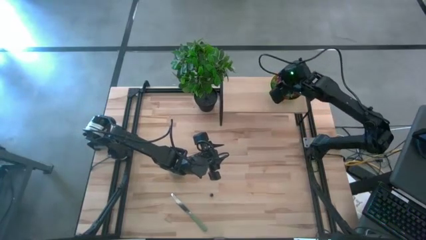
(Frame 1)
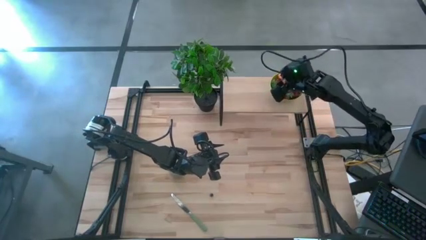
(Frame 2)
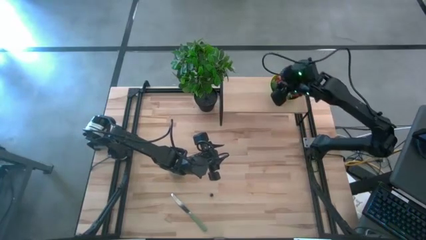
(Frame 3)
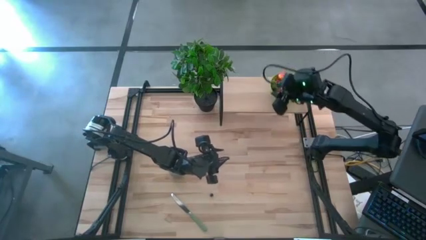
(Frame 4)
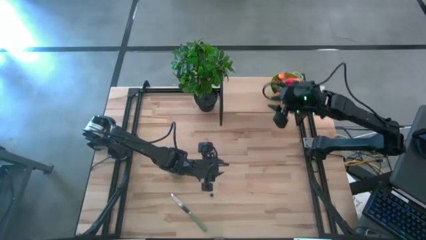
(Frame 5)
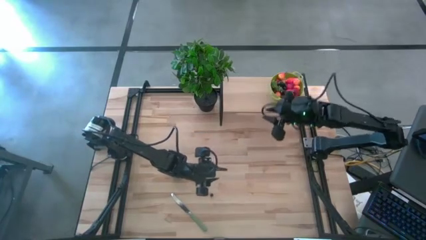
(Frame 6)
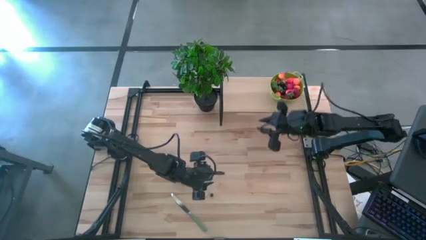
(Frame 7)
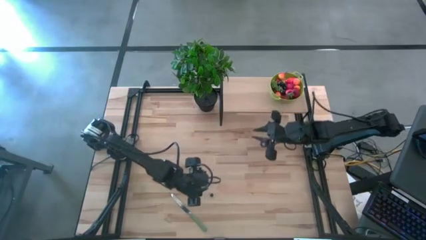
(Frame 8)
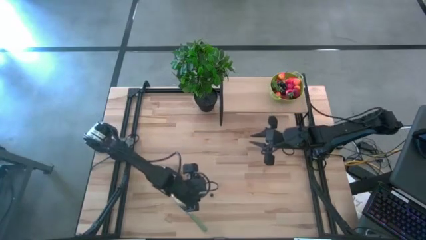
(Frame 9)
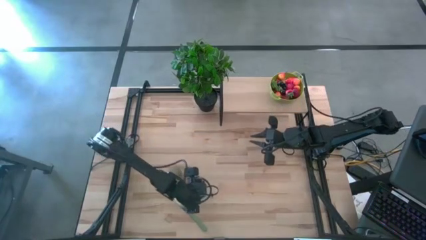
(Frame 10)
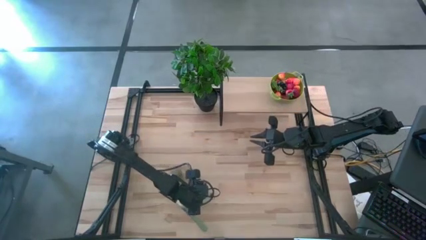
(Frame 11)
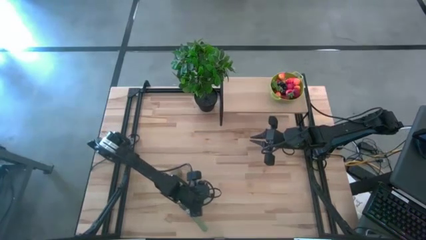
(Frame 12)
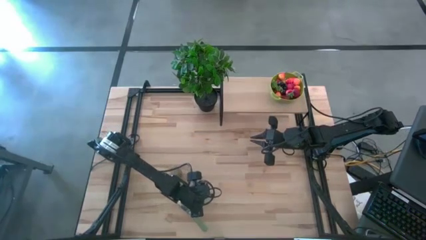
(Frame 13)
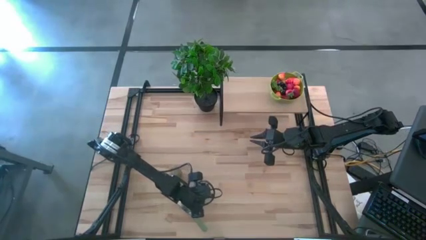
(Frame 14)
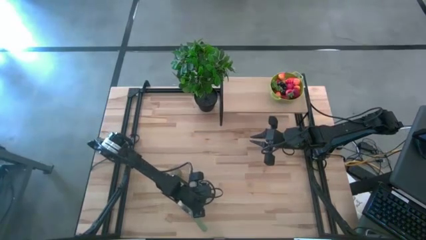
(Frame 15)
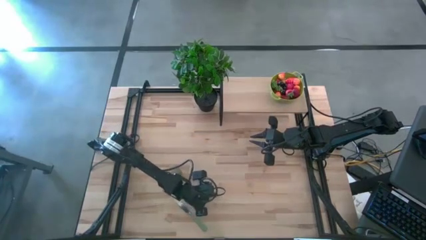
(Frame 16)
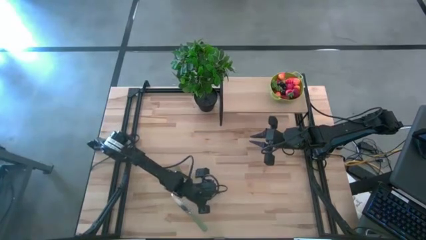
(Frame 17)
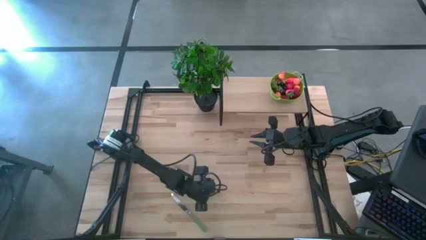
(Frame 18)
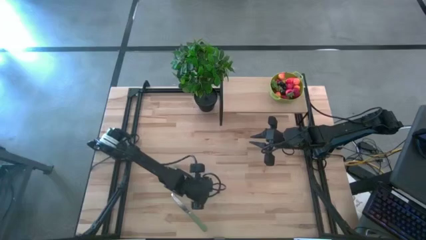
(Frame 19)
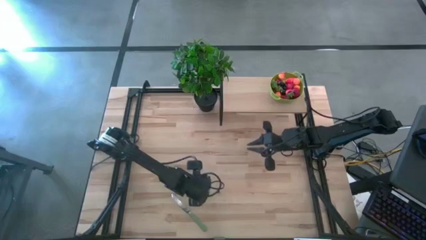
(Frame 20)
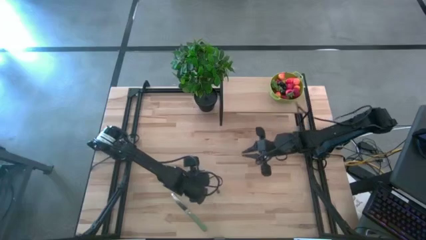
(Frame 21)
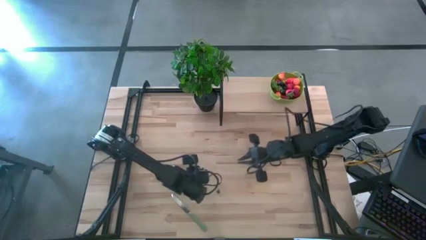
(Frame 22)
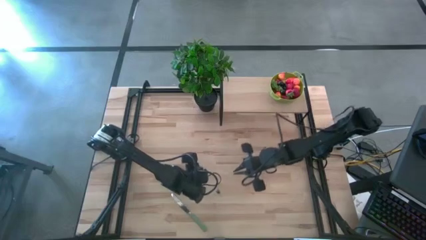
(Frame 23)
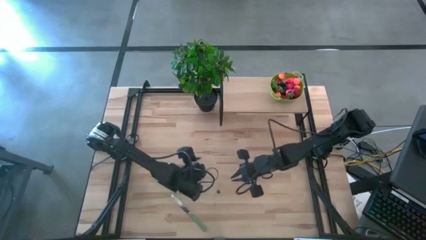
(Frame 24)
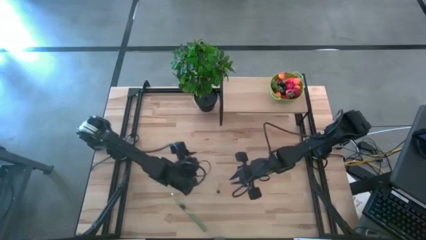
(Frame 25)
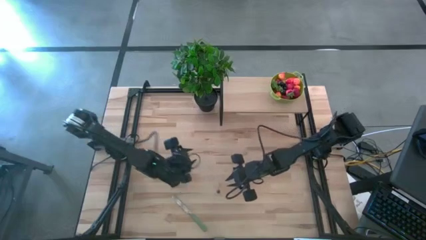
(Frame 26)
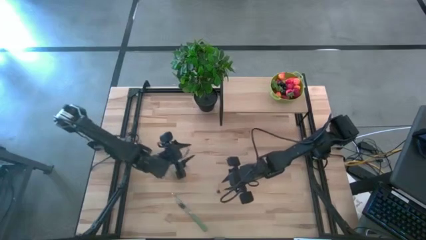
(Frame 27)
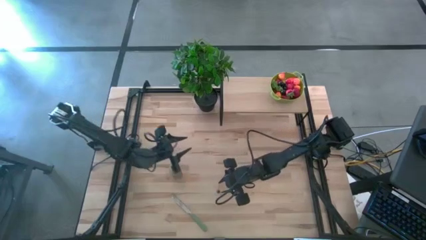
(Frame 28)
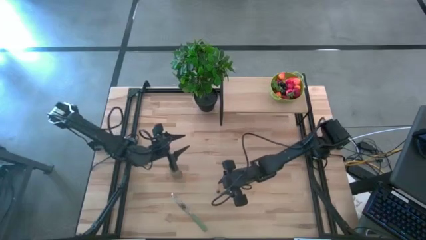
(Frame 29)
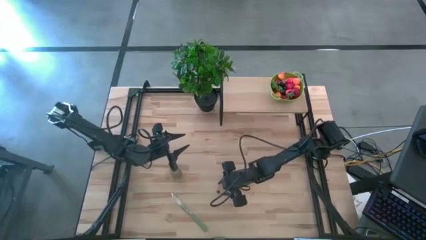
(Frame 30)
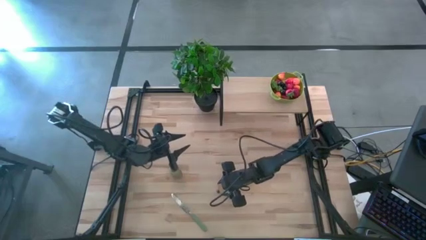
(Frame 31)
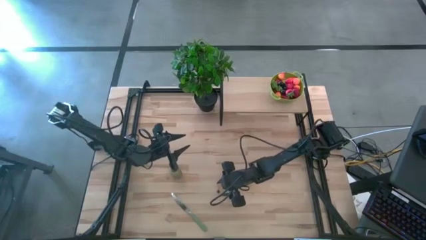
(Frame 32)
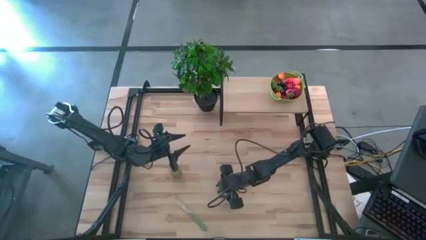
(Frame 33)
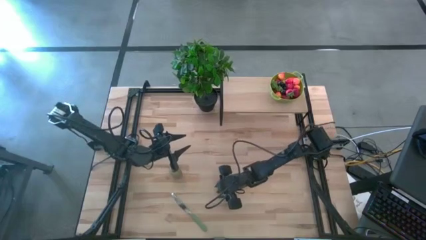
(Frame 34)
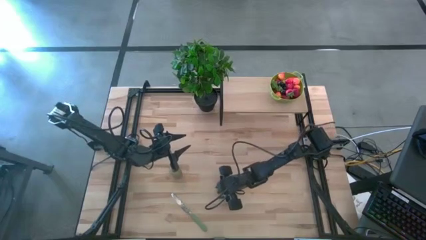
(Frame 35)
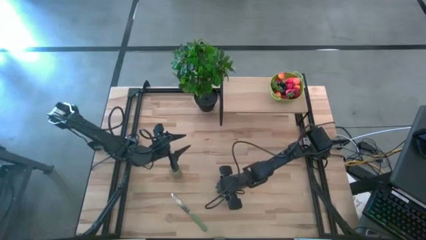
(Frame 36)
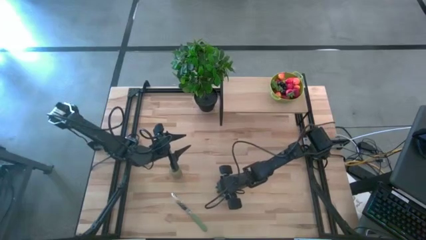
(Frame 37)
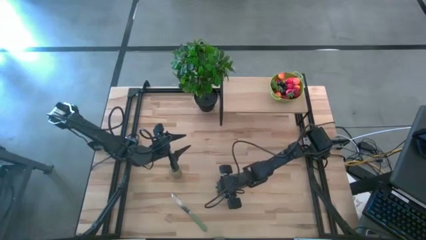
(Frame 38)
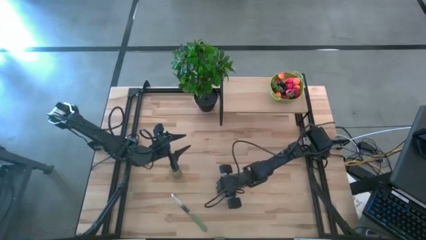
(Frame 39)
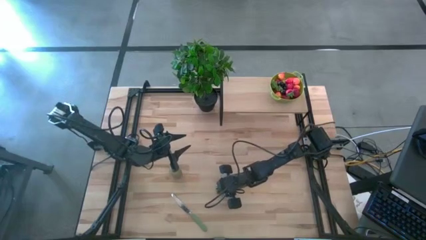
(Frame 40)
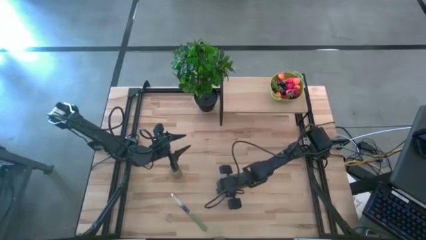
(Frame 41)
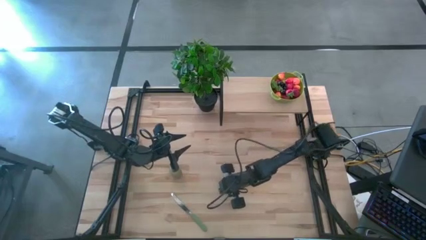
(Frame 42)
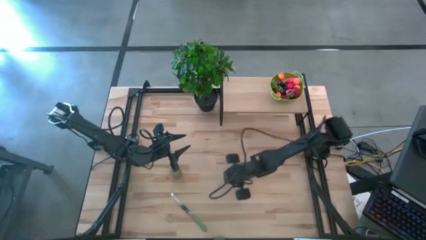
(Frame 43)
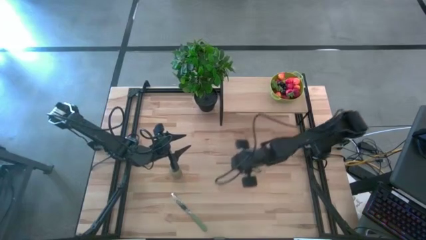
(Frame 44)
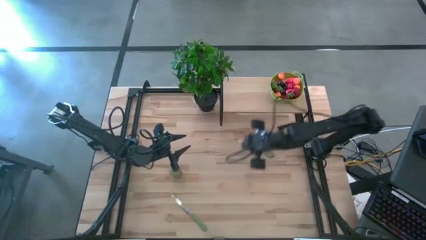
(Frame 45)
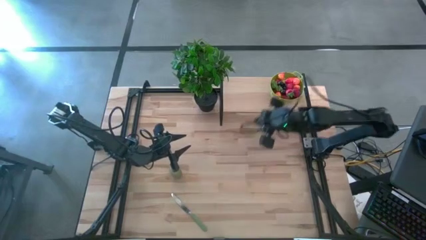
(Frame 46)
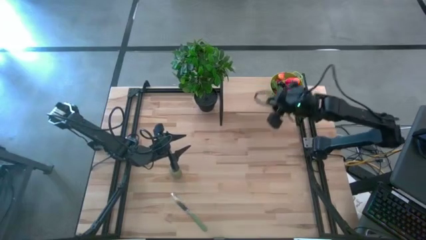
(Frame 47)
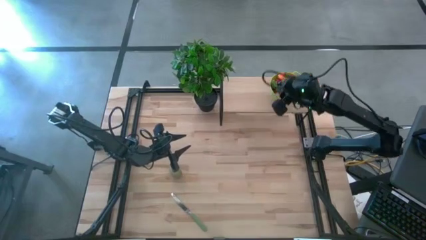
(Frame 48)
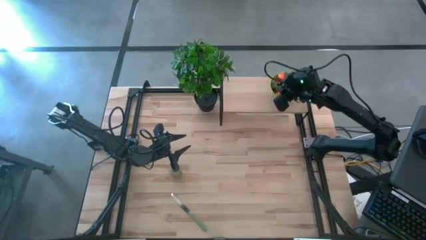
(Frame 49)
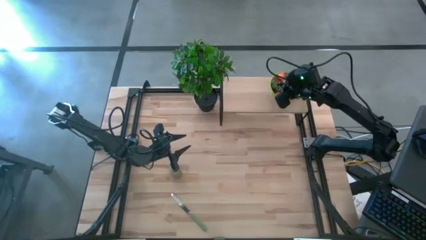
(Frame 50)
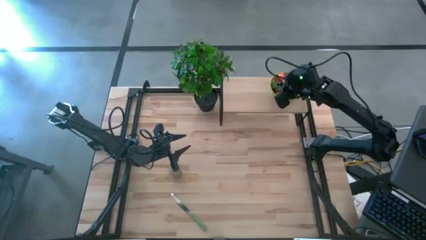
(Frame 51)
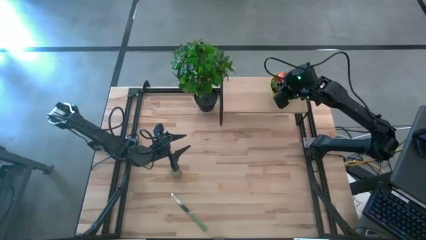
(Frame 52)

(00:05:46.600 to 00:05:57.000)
Task: Pick & Place Fruit
Put the blueberry into the green strainer bowl on the shelf
